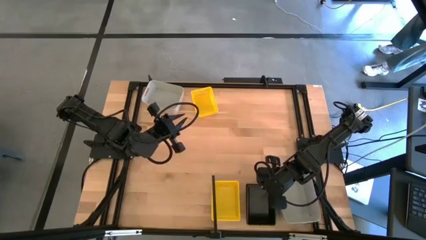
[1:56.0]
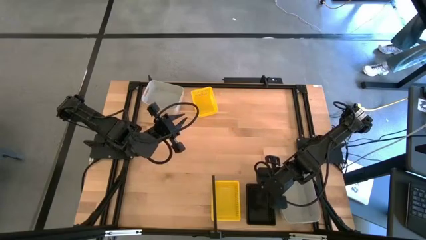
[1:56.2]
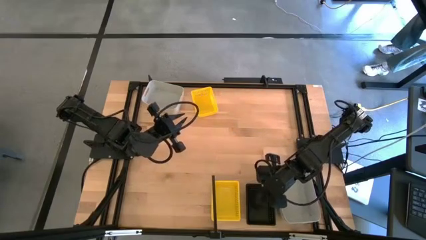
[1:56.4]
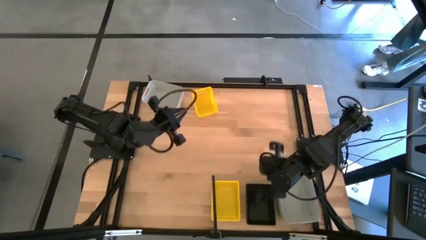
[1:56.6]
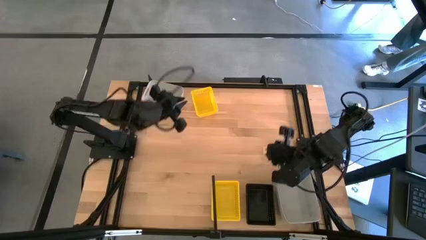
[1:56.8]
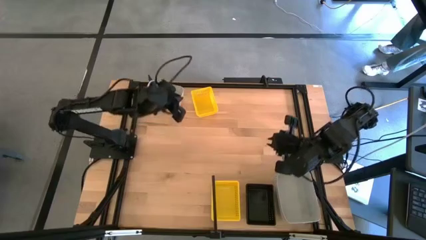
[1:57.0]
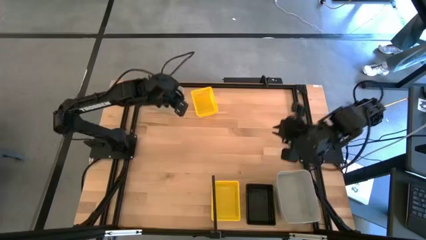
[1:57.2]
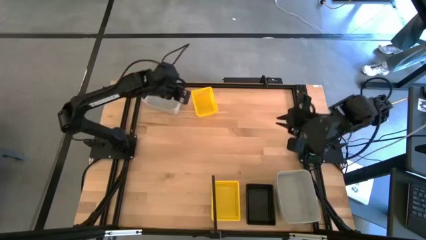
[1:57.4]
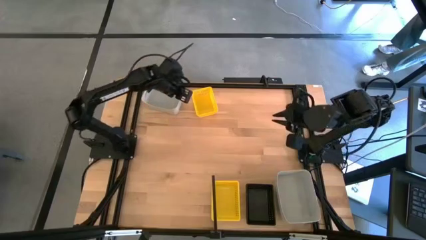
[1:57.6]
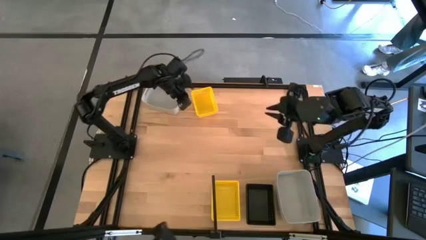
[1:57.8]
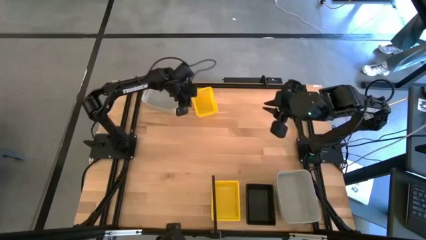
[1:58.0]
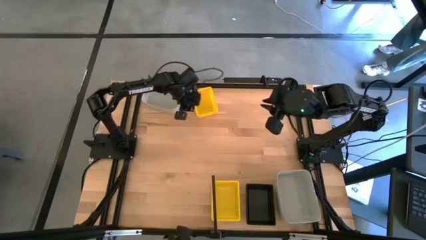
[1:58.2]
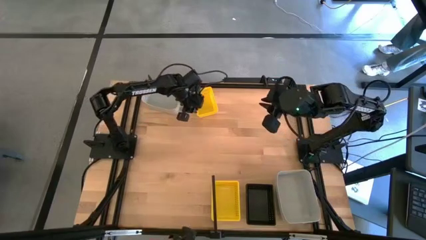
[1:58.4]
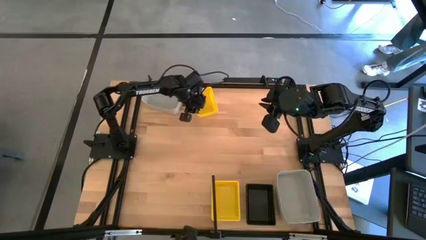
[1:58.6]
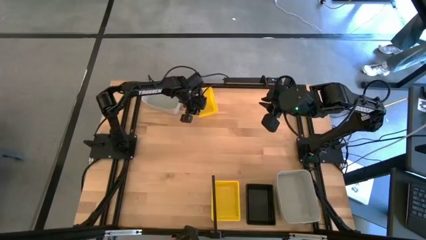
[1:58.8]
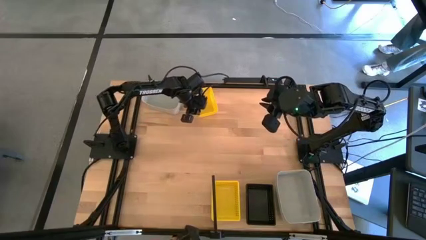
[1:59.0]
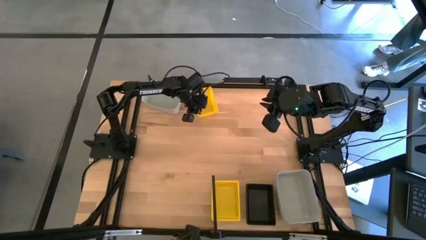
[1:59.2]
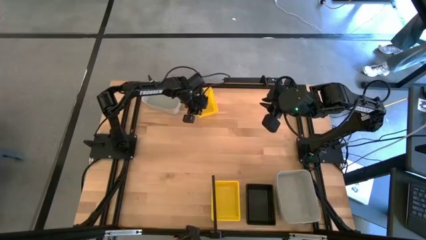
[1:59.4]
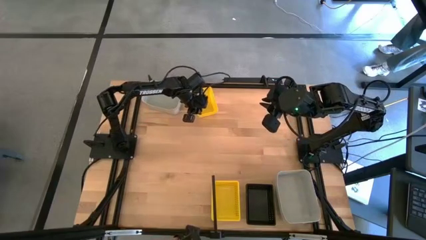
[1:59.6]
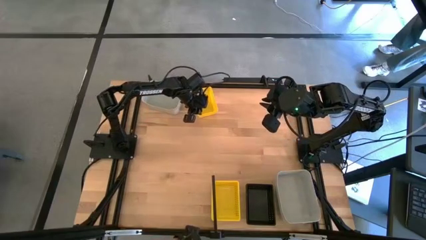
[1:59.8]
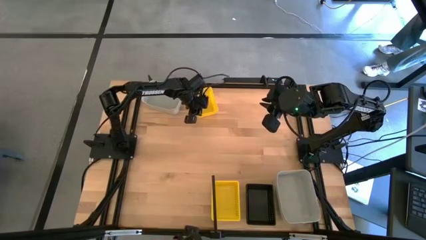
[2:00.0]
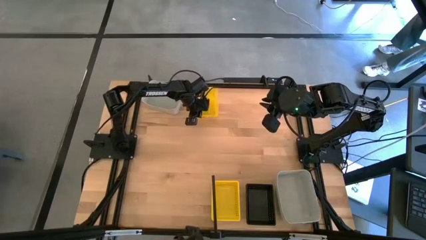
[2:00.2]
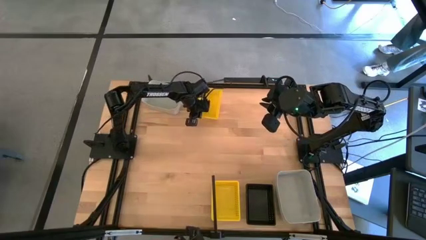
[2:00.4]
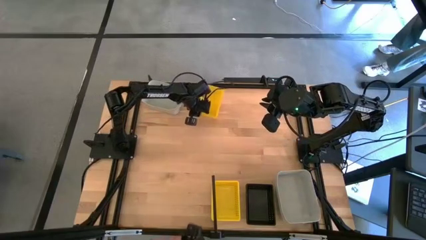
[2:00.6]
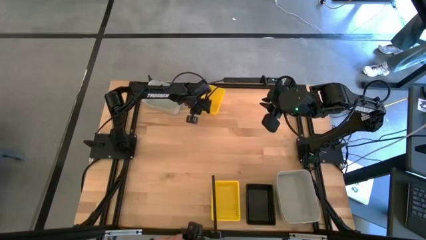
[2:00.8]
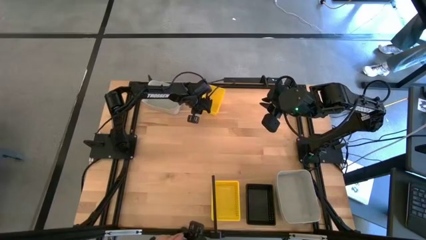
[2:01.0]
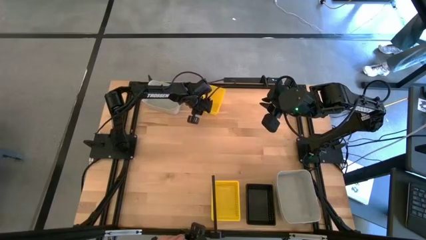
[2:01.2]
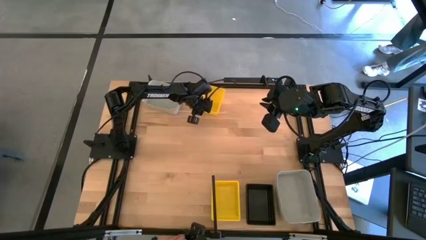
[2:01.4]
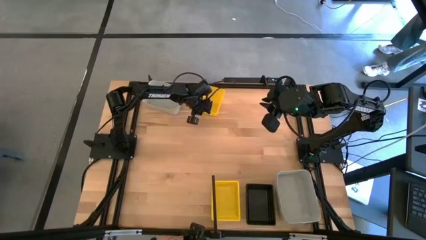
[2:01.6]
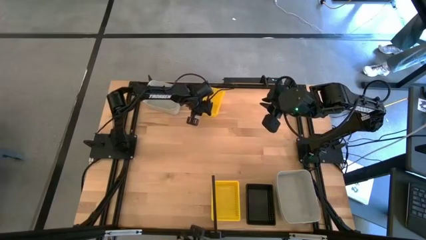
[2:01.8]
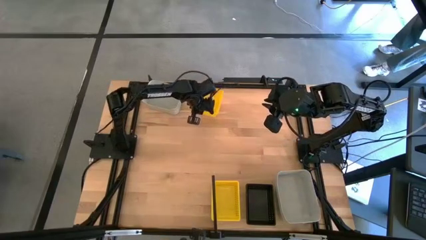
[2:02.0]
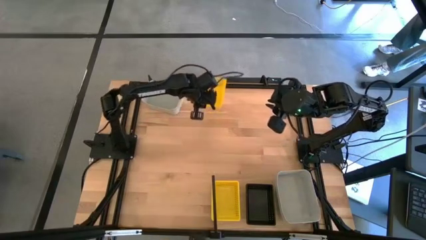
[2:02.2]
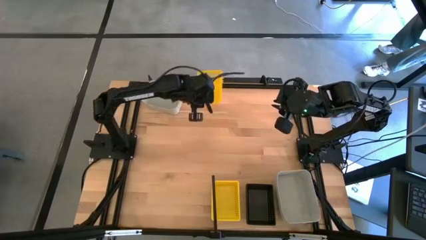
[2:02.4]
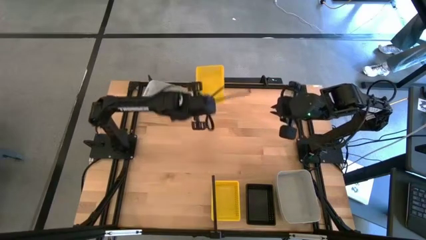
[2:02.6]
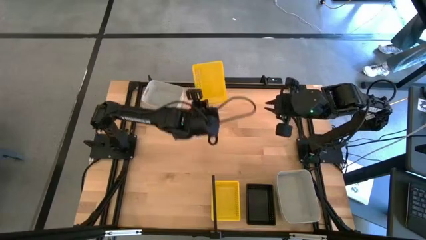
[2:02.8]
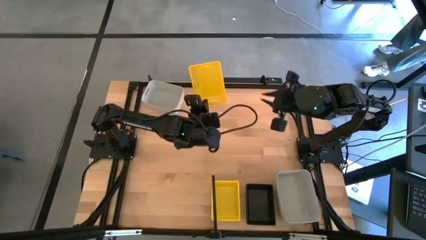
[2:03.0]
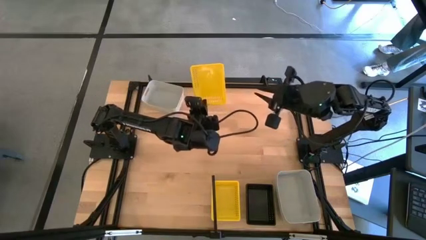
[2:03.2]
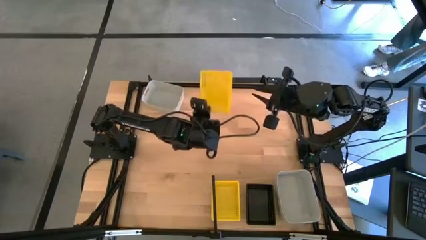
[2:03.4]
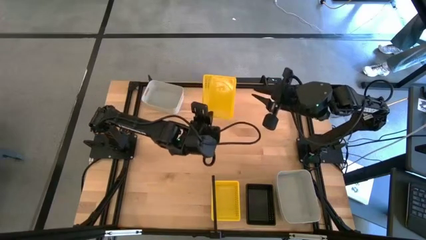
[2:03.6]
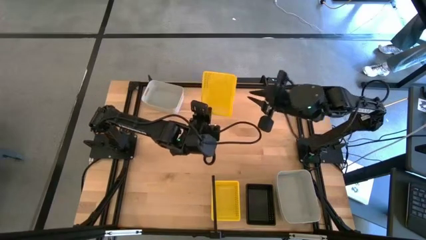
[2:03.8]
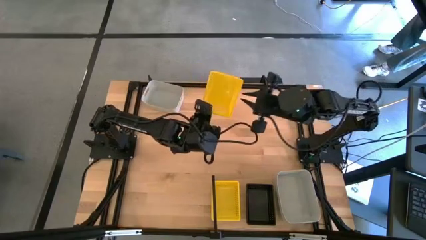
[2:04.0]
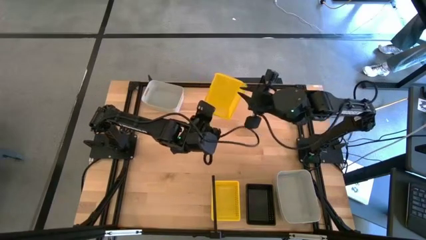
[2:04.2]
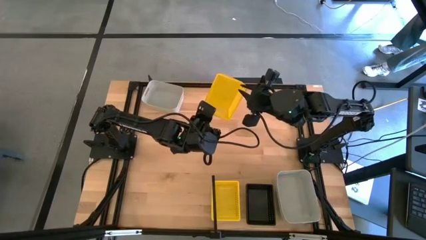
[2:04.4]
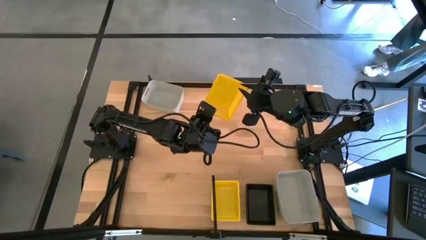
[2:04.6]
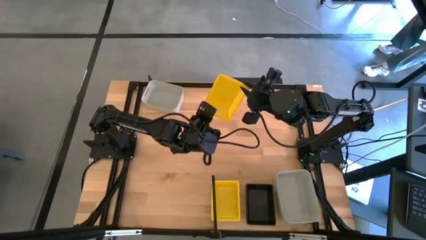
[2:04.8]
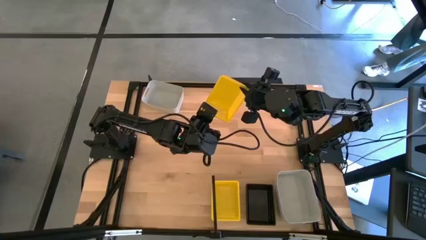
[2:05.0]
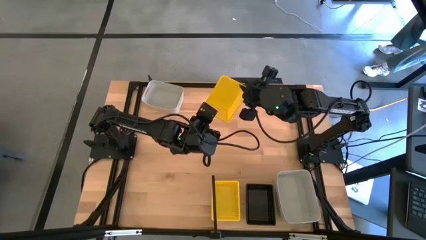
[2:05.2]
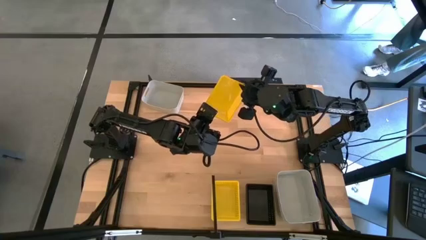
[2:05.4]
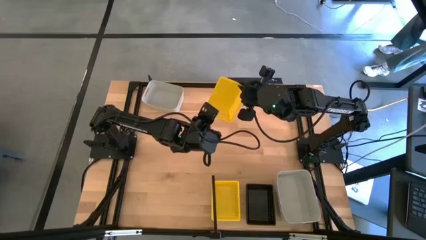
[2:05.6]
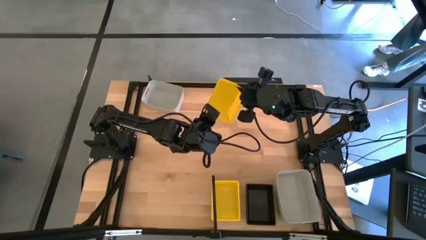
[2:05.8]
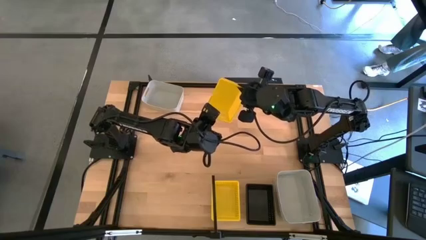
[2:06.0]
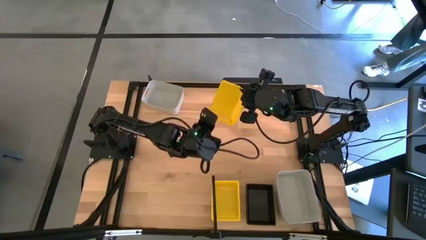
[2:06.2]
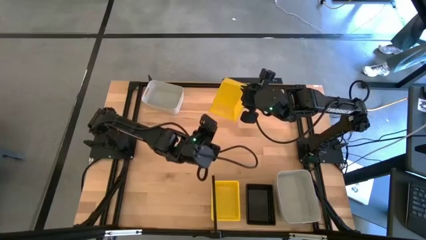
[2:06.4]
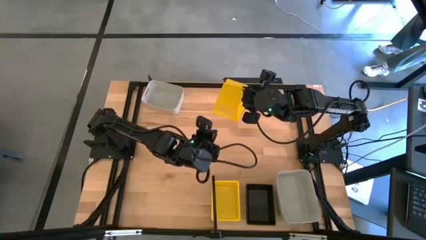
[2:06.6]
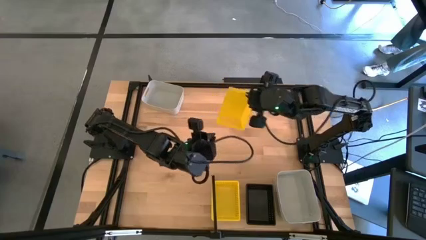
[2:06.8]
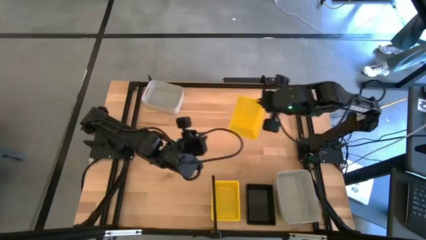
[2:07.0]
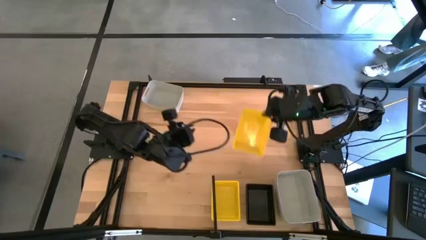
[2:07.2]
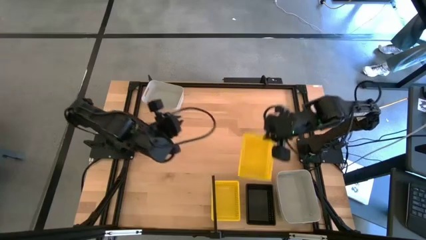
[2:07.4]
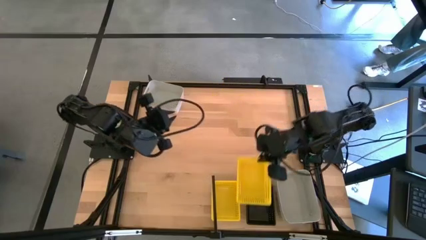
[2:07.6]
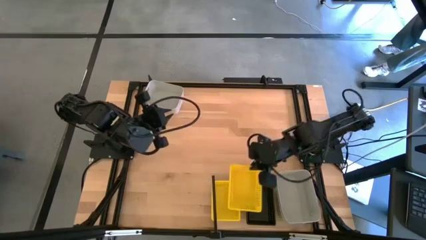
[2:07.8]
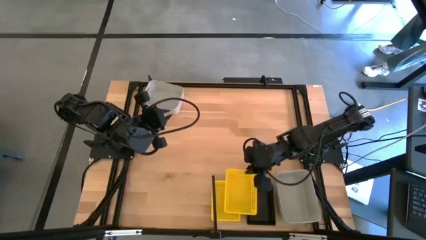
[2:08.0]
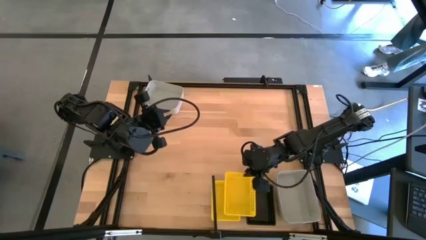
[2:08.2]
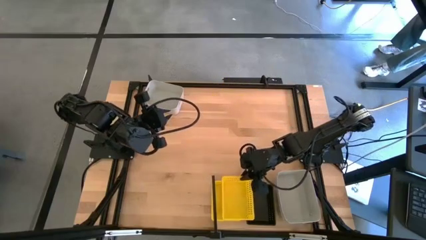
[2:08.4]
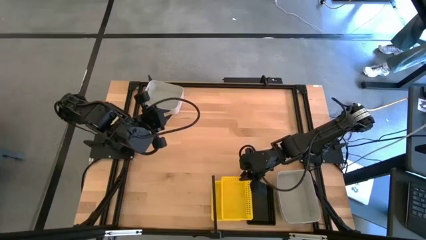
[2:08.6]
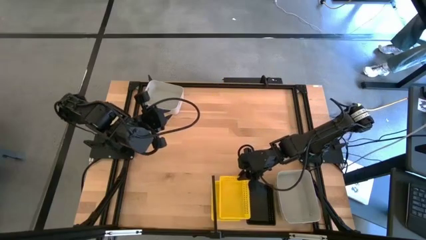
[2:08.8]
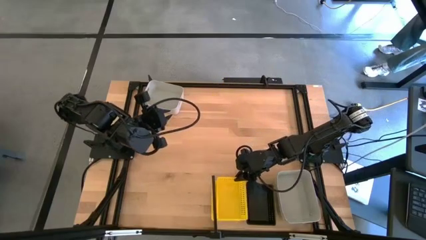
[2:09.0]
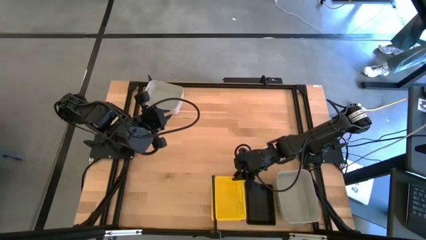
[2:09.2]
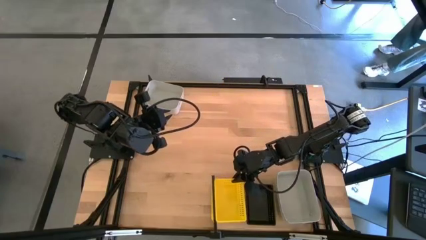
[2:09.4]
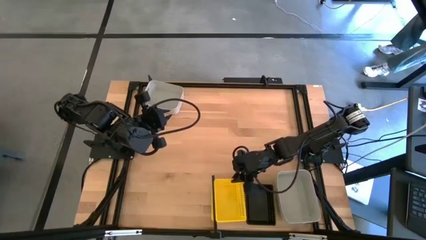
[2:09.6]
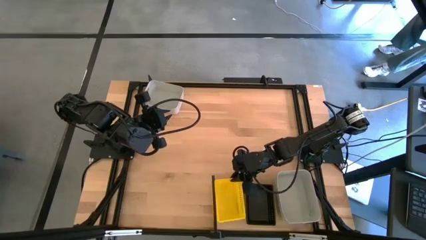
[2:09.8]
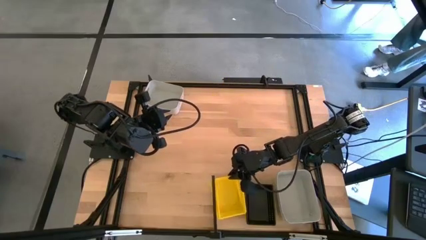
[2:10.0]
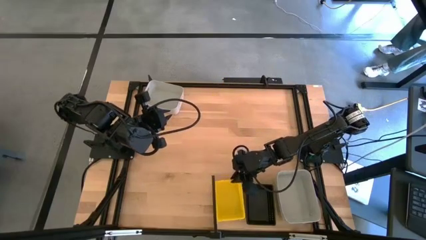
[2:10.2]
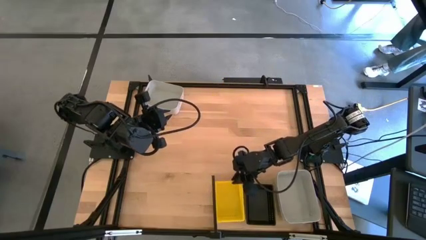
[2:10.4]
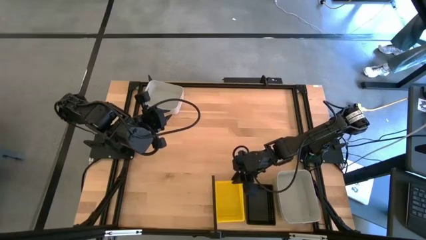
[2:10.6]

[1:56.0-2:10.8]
Task: Stack baskets on shelf by color
Stack the yellow bin on top of the yellow bin on the shelf

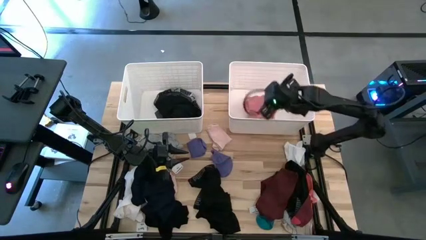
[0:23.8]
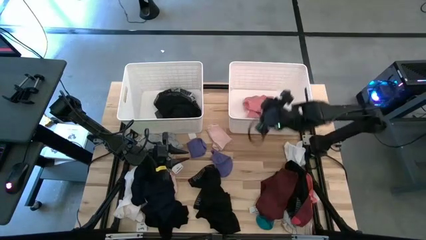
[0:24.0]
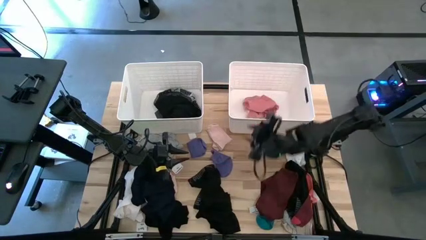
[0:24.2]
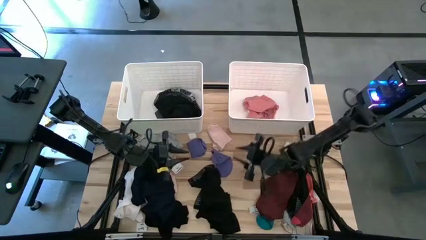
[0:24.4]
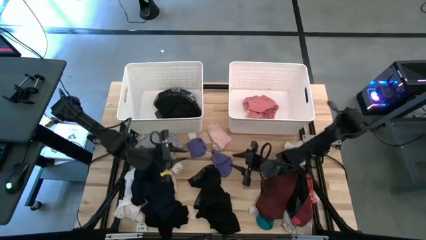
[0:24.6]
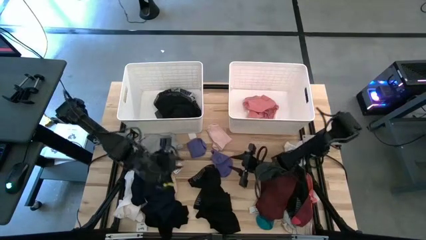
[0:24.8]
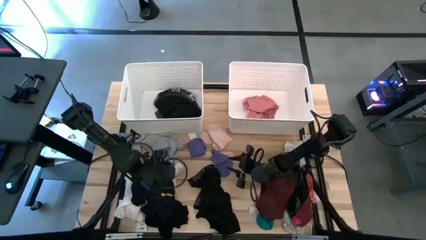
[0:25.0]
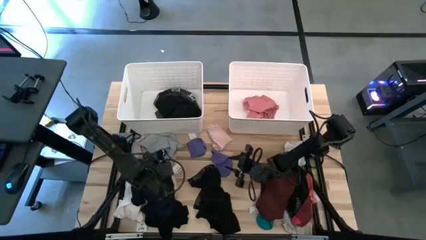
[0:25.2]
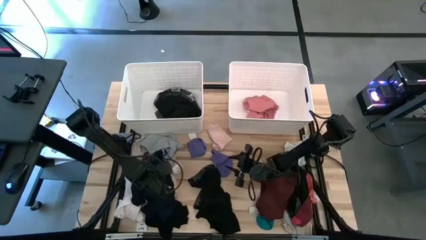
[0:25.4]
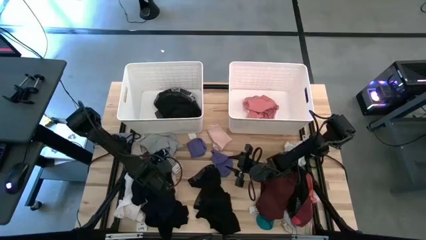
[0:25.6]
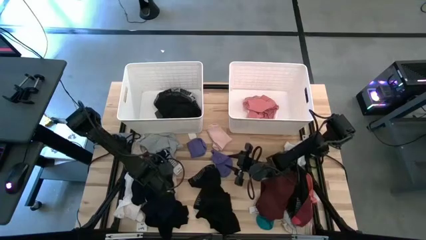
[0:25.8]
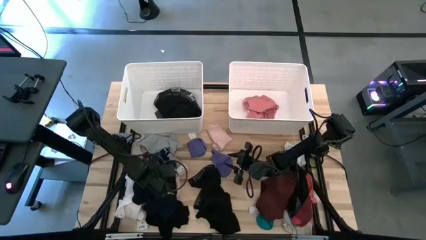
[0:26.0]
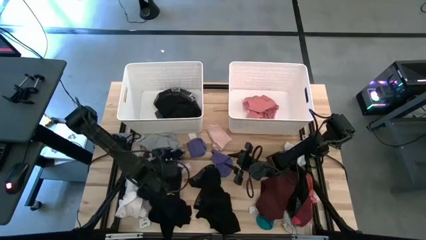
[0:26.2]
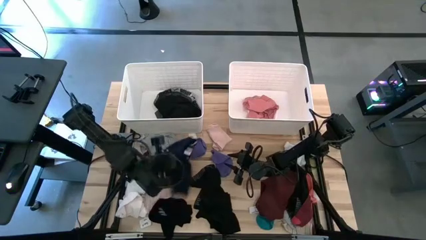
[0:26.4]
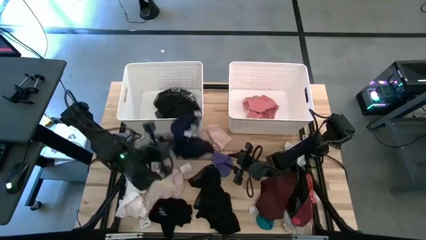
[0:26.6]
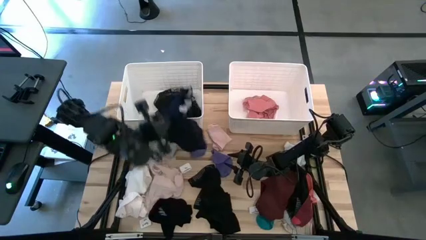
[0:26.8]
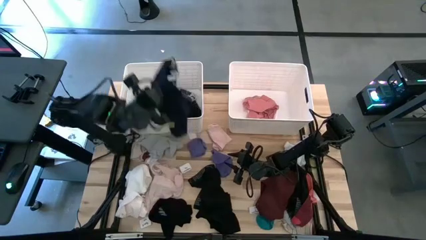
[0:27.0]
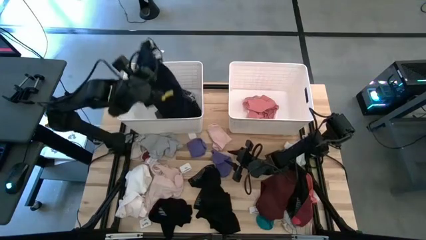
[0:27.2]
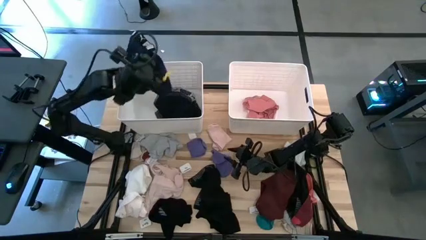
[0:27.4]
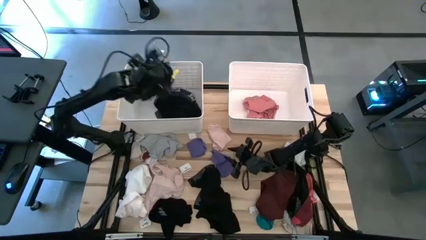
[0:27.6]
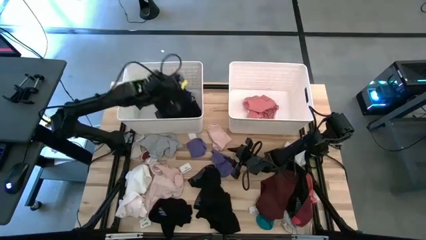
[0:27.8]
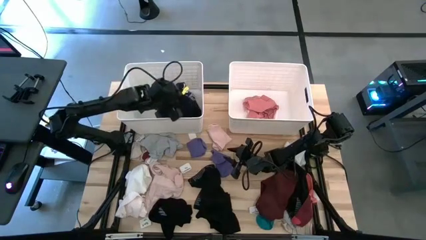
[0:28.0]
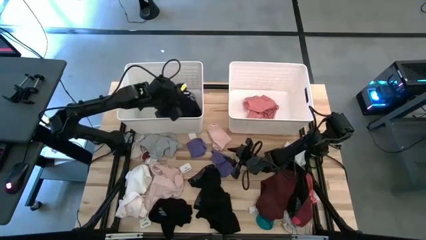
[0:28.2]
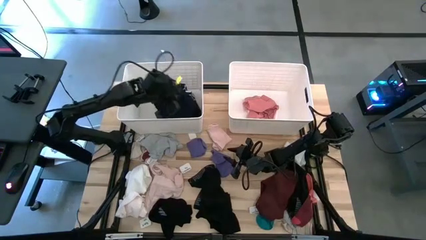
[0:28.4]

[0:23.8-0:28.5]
Task: Sort clothes
Put the dark blue boxer into the left white laundry bin
